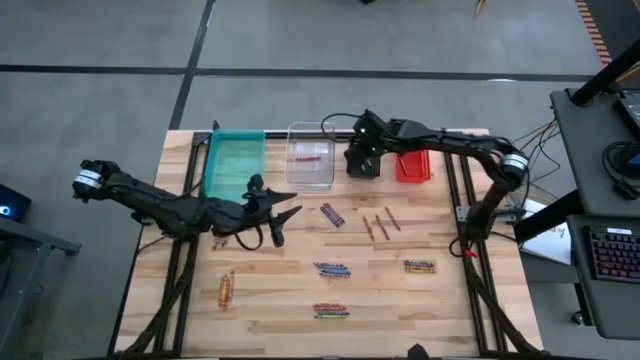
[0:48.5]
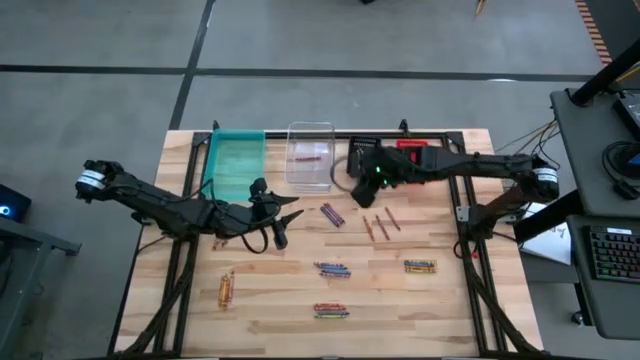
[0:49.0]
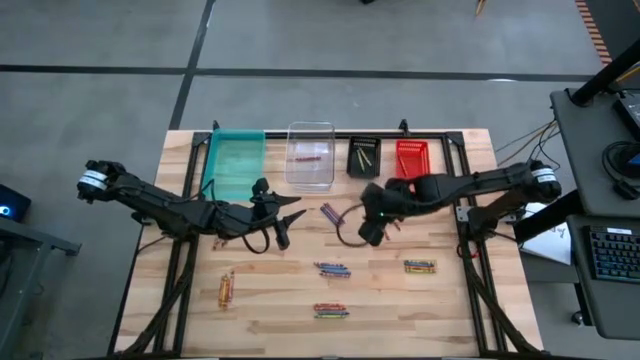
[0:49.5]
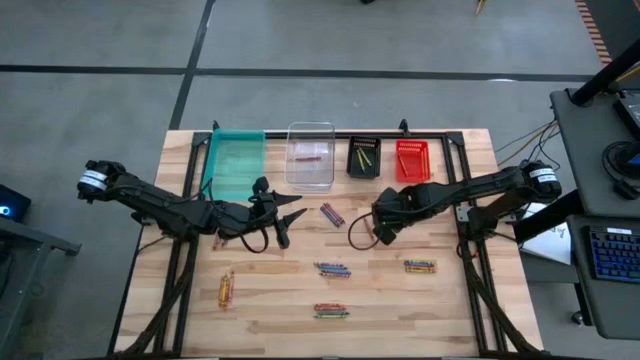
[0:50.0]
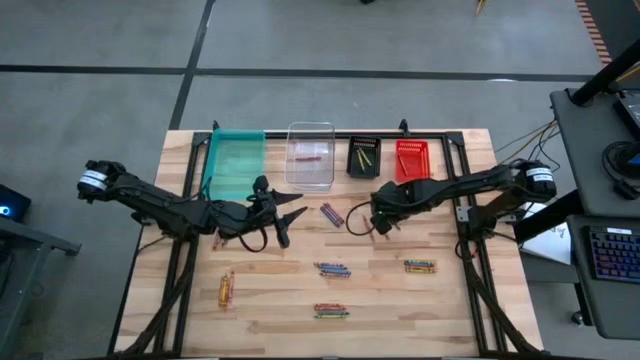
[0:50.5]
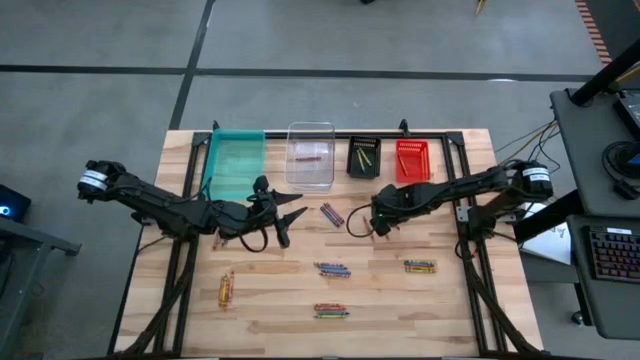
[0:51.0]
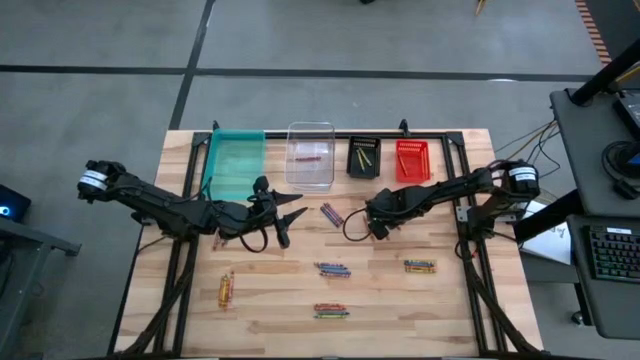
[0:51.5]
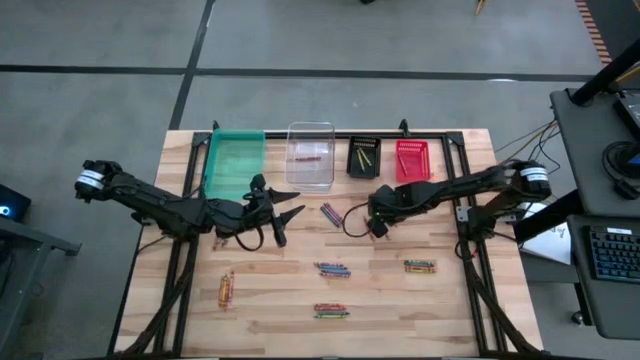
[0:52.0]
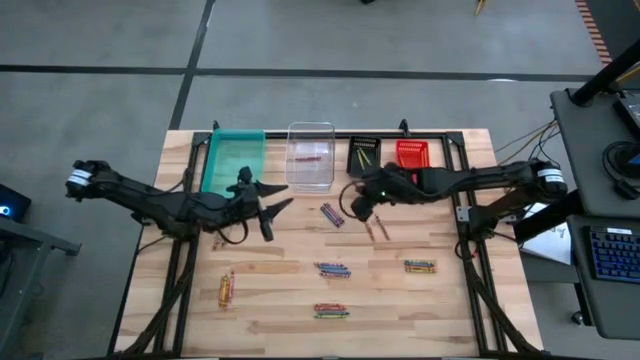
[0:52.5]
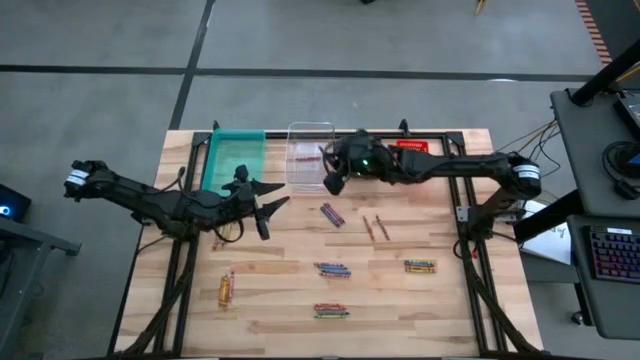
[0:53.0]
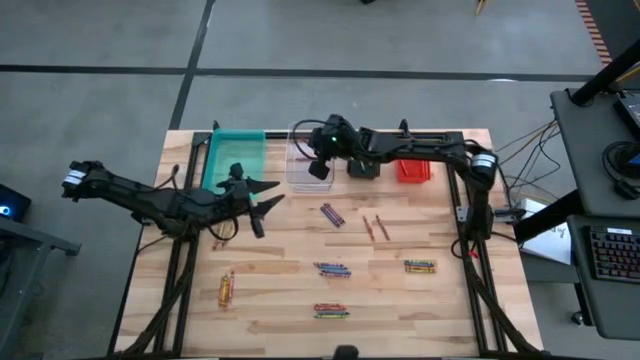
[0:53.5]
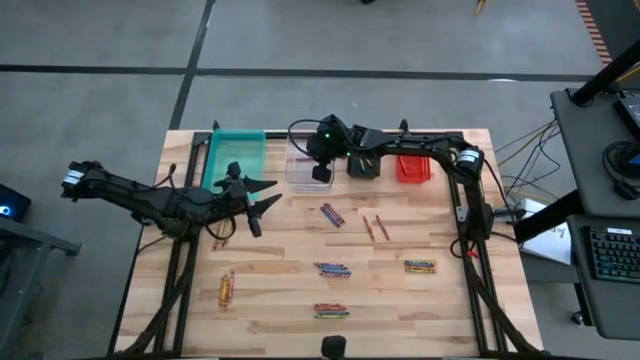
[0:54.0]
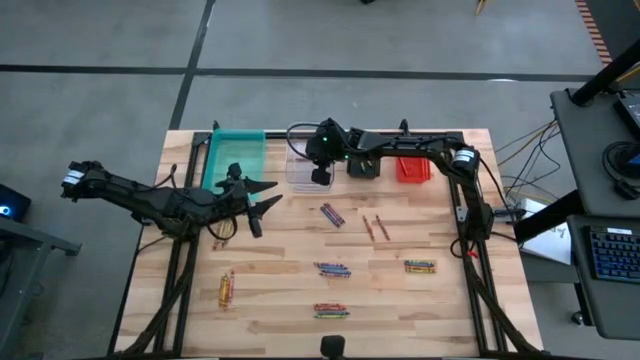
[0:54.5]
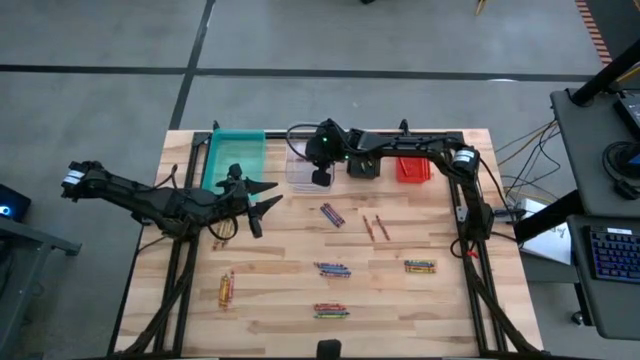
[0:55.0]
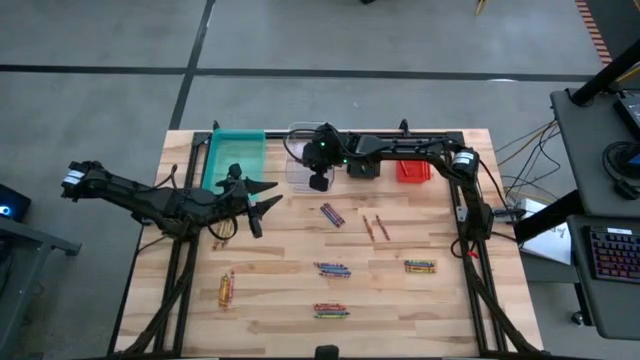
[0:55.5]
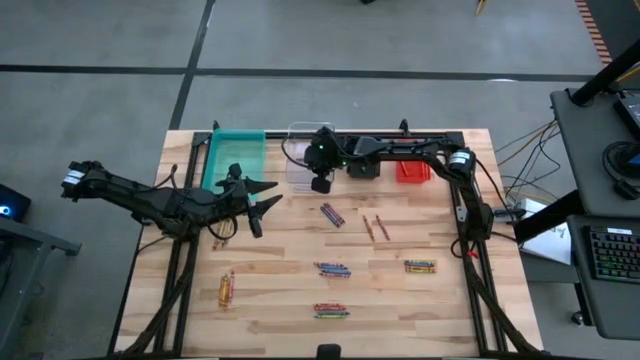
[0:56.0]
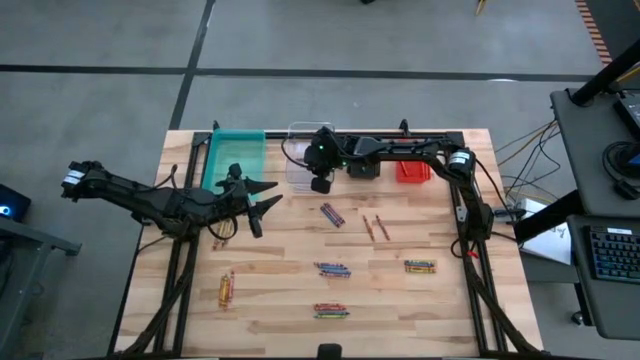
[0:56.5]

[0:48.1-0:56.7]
Task: Sort crayons
Put the red crayon into the transparent bin

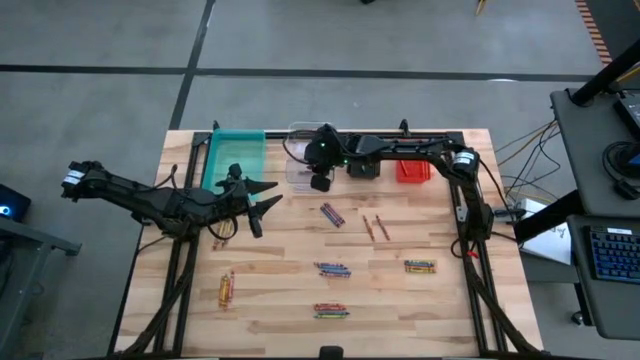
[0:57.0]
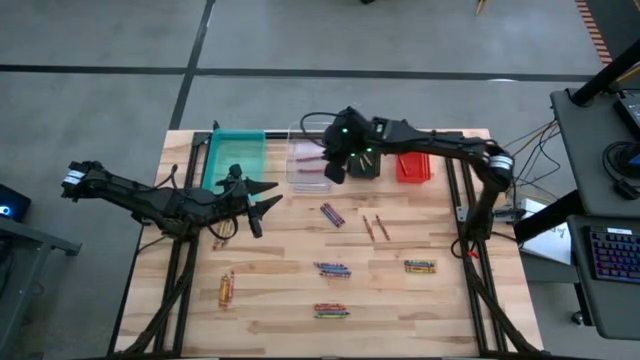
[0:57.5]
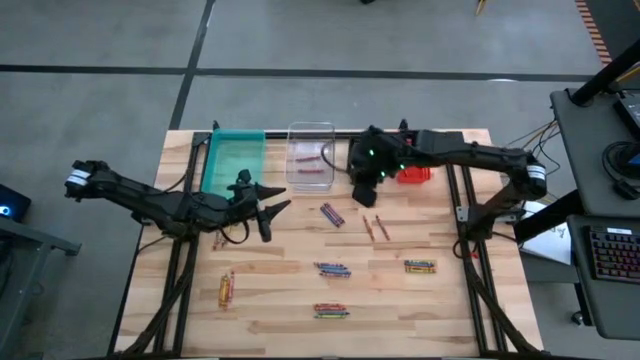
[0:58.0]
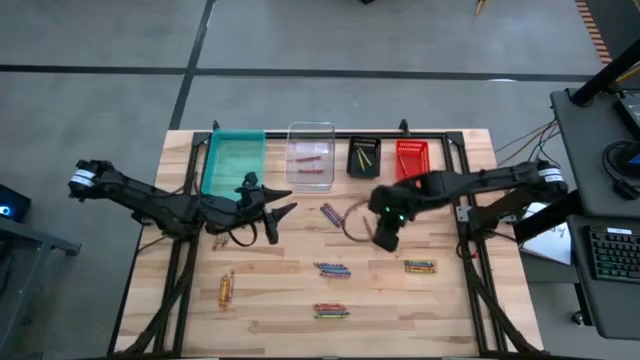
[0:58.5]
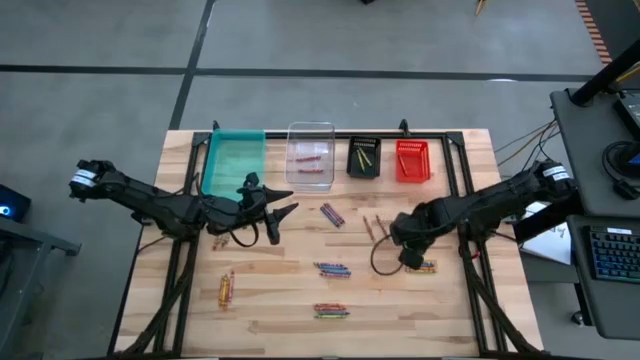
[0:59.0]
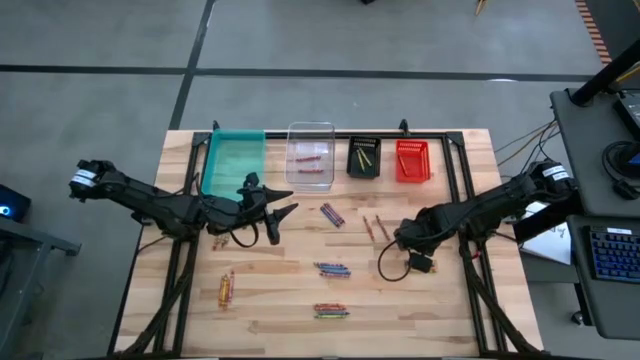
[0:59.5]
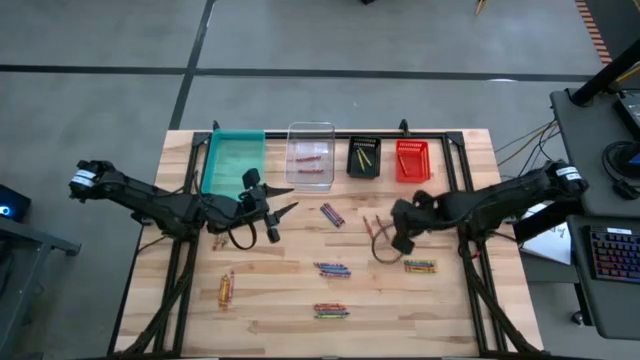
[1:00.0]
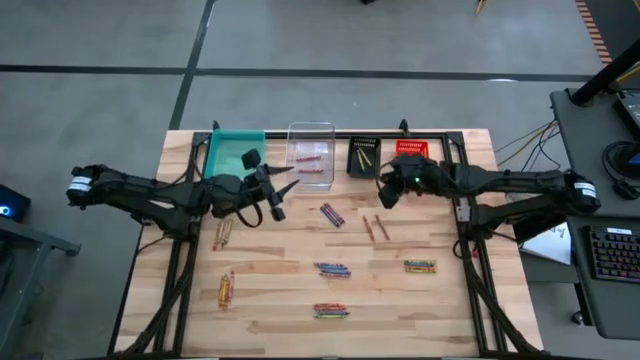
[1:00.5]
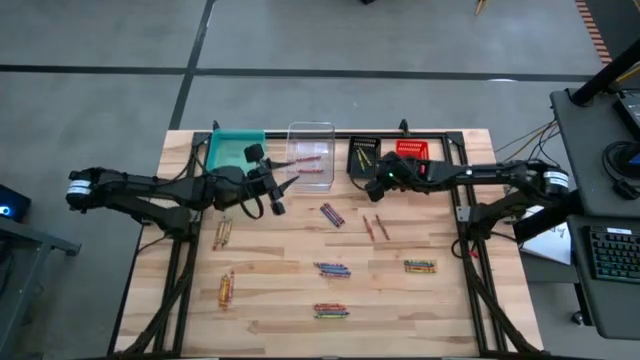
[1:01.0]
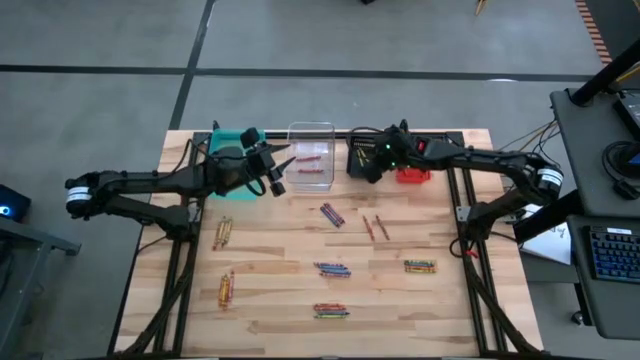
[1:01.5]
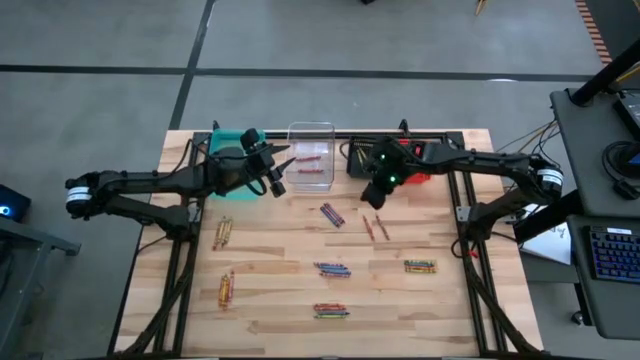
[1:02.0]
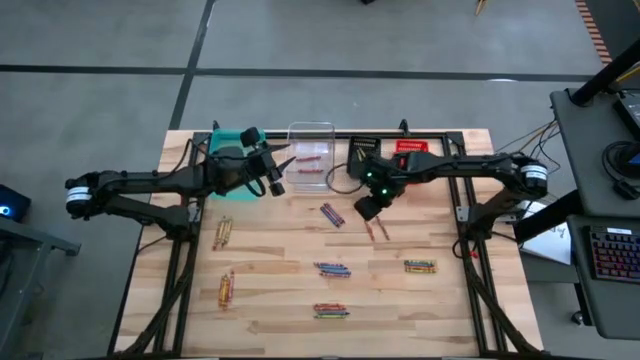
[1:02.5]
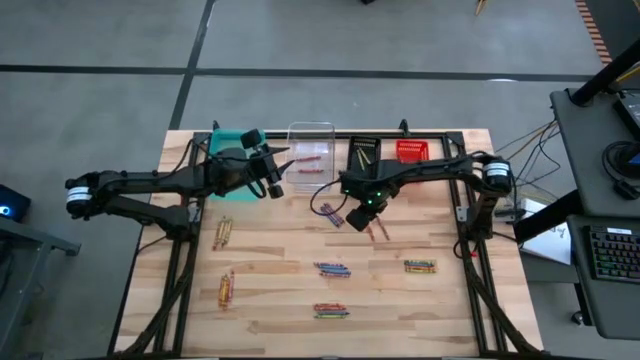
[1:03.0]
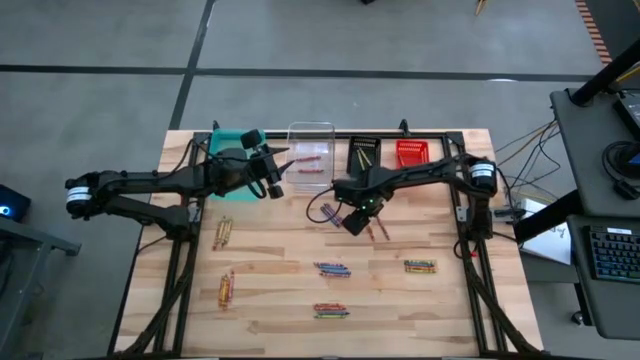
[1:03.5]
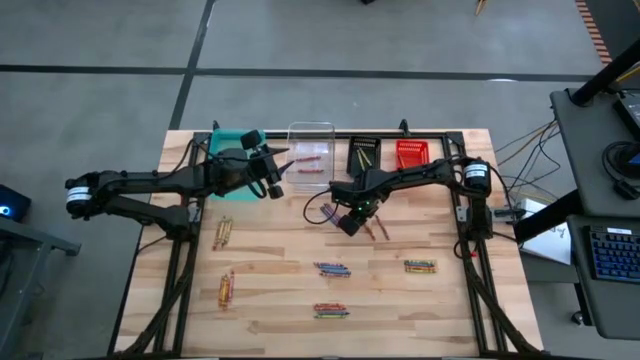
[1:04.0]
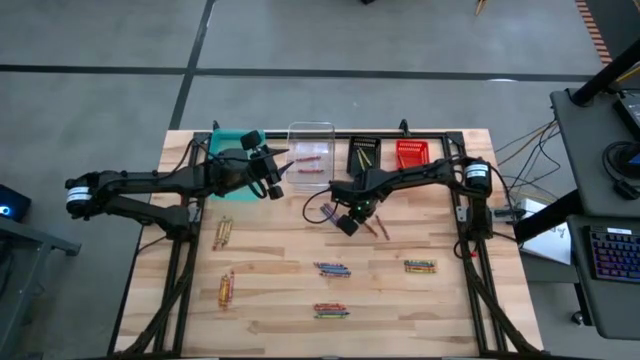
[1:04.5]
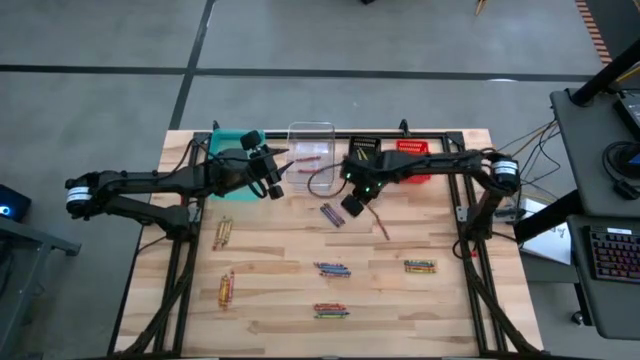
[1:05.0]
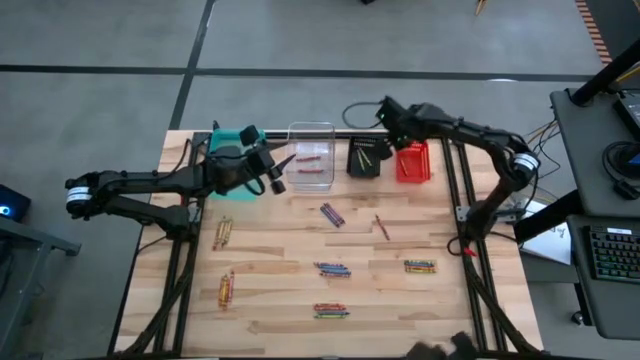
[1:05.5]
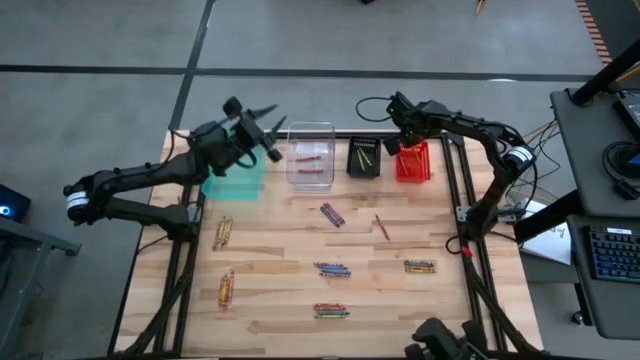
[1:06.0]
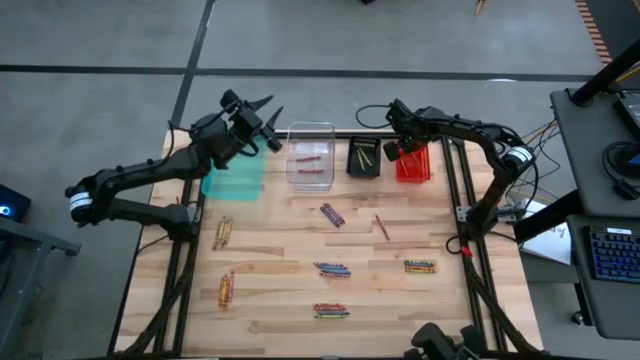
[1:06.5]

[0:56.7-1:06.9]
Put the orange crayon into the orange bin

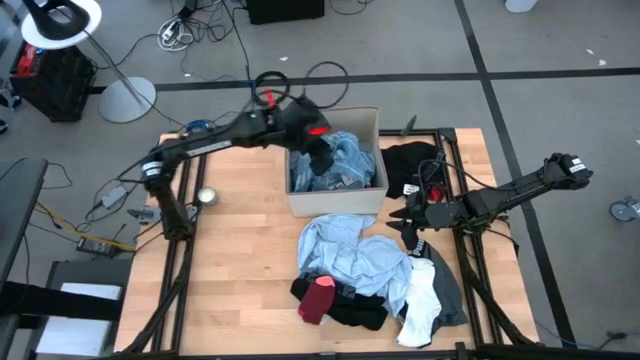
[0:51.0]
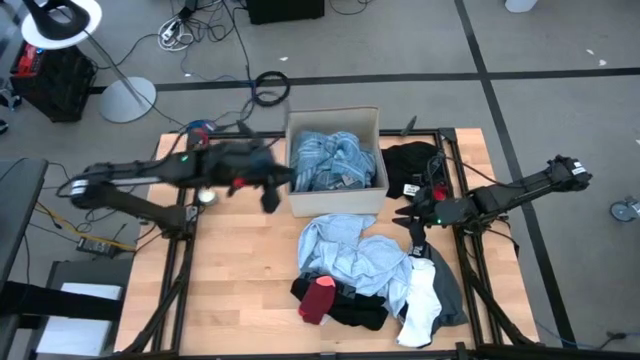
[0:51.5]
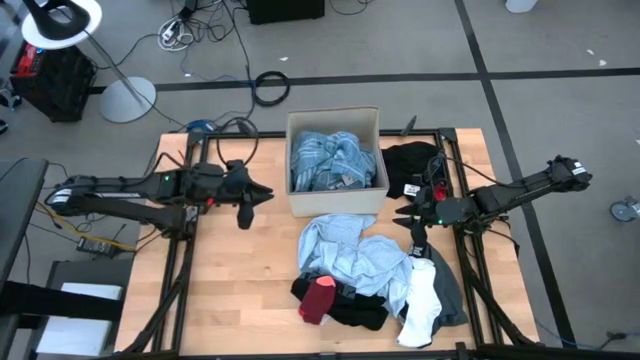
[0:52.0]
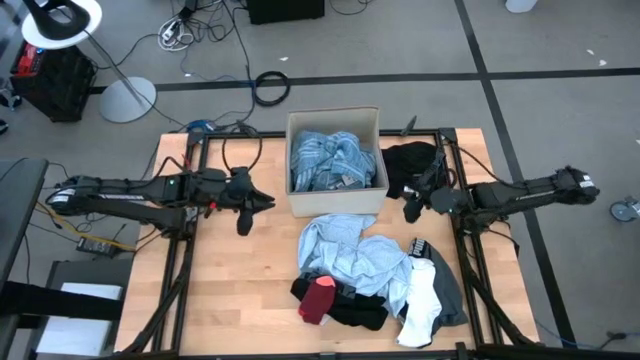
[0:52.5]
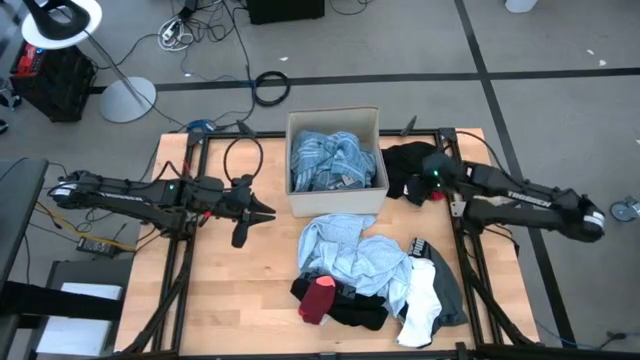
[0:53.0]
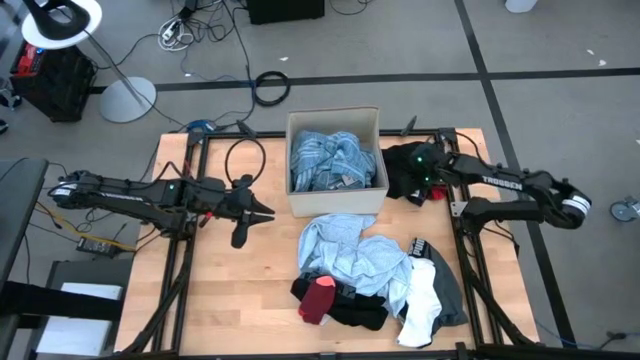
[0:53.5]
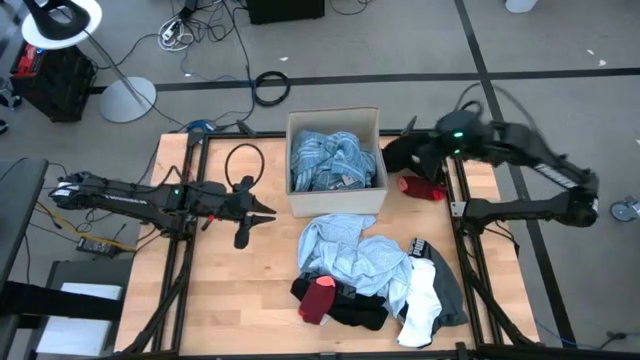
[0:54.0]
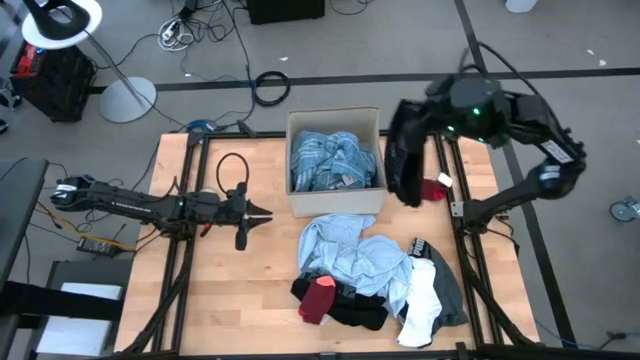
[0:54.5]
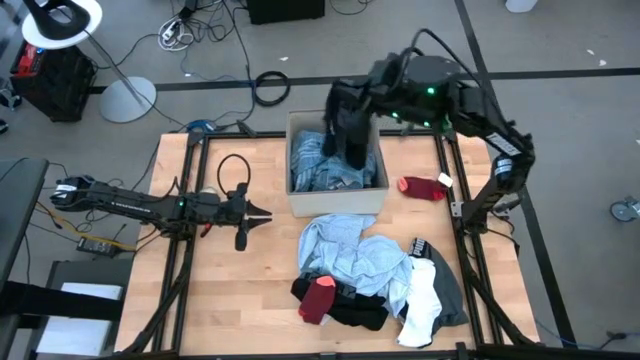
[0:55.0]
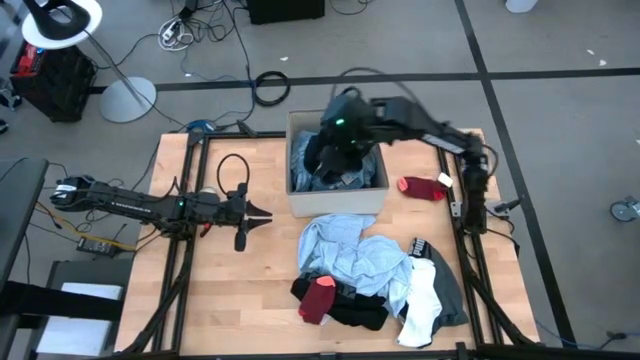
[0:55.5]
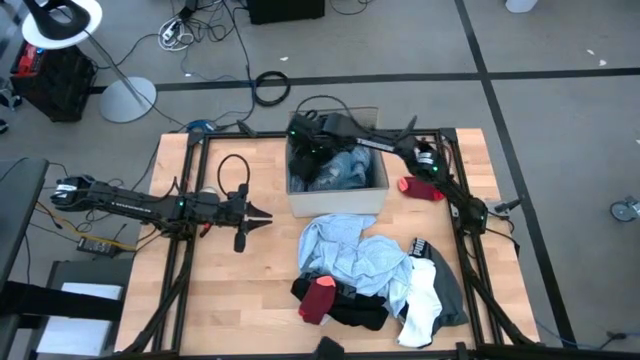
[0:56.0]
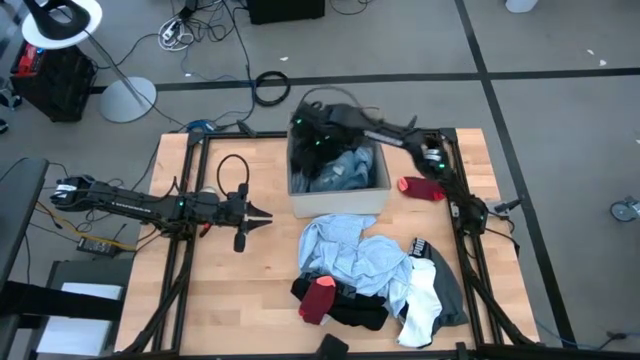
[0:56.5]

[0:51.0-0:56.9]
Task: Sort clothes
Put the top black underwear into the white laundry bin
